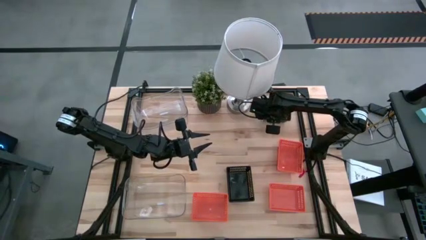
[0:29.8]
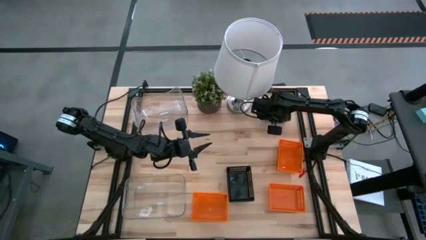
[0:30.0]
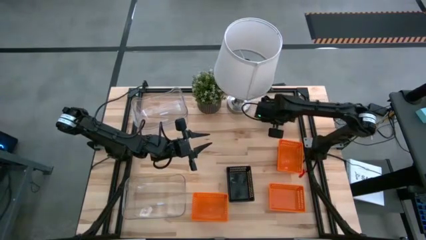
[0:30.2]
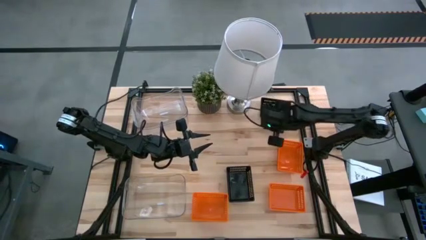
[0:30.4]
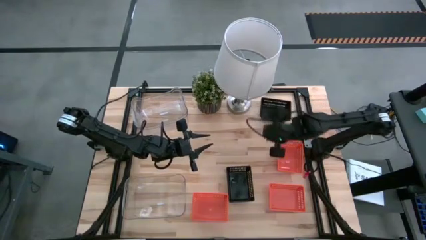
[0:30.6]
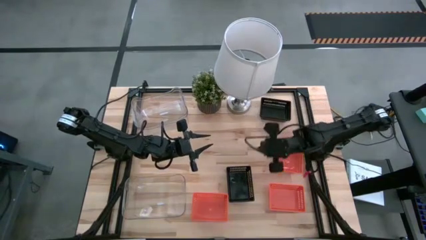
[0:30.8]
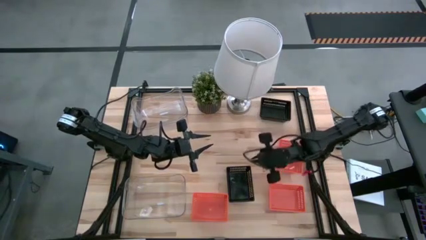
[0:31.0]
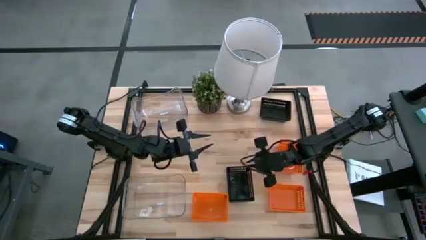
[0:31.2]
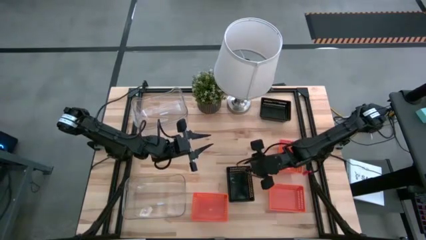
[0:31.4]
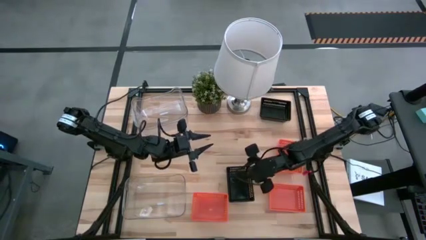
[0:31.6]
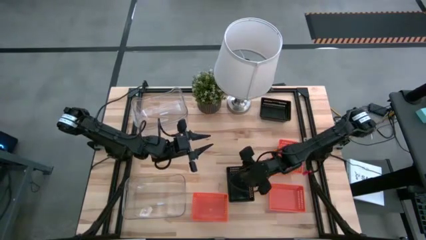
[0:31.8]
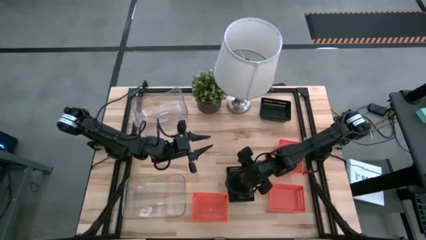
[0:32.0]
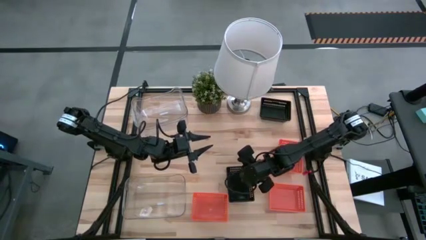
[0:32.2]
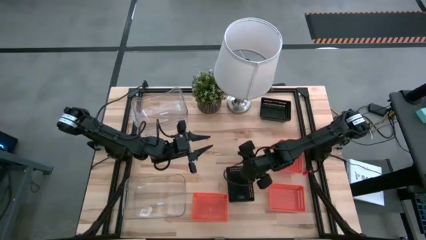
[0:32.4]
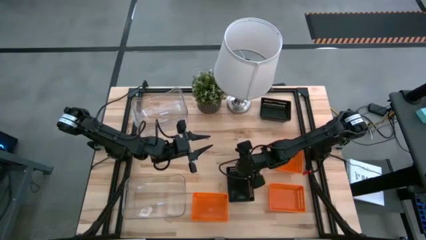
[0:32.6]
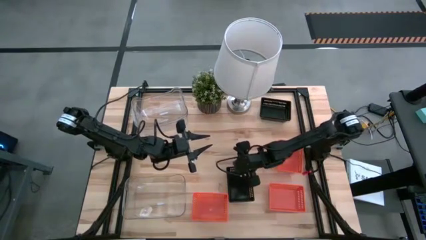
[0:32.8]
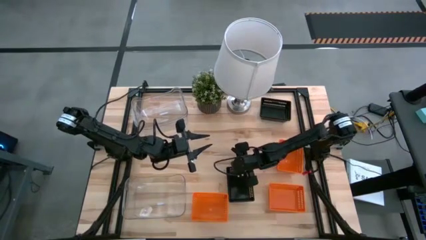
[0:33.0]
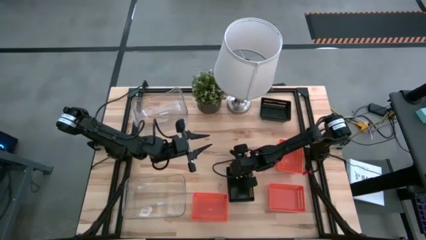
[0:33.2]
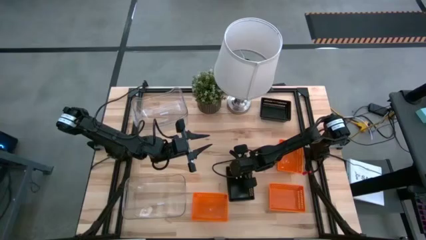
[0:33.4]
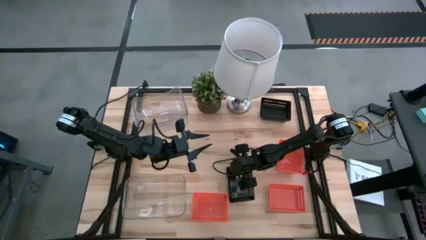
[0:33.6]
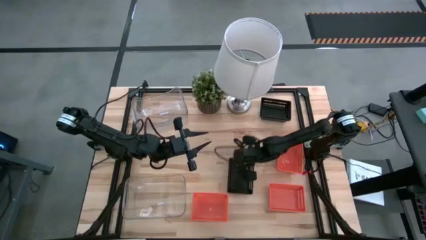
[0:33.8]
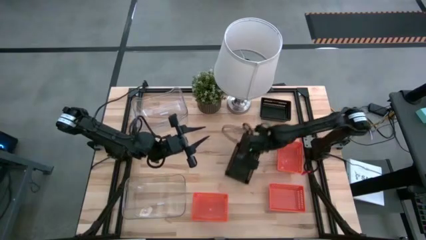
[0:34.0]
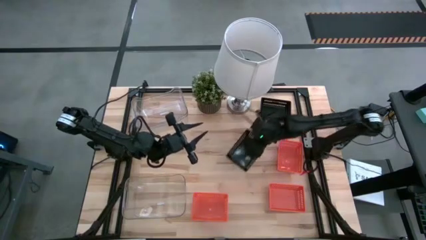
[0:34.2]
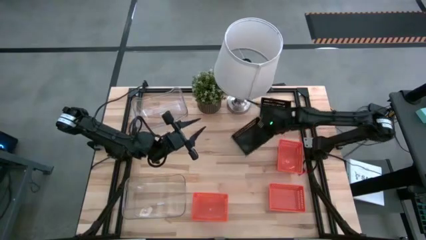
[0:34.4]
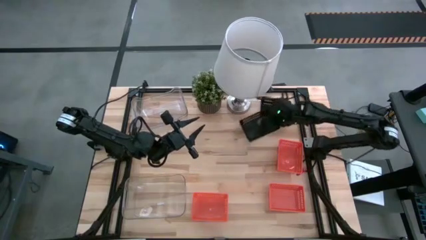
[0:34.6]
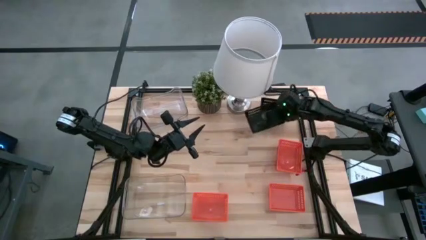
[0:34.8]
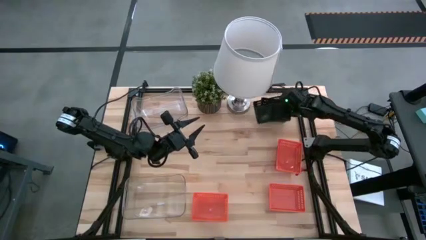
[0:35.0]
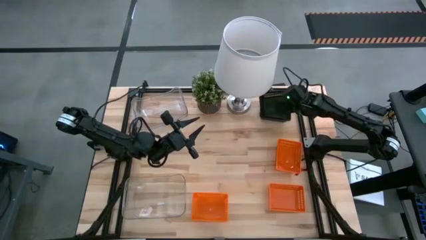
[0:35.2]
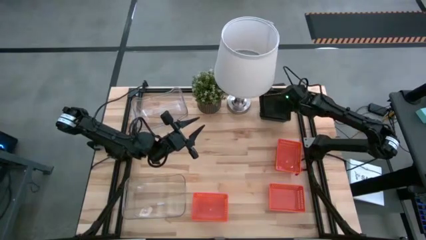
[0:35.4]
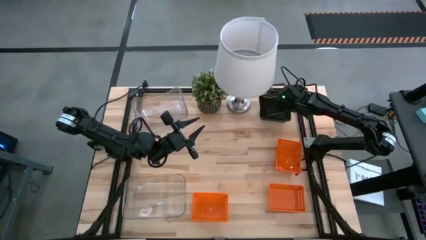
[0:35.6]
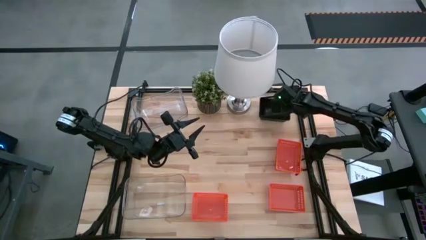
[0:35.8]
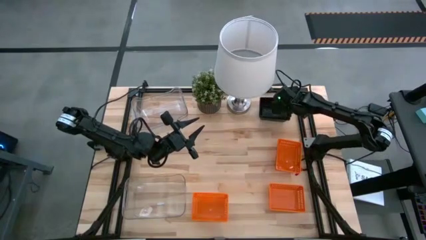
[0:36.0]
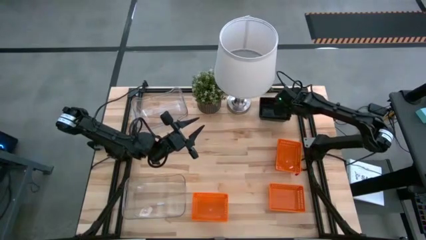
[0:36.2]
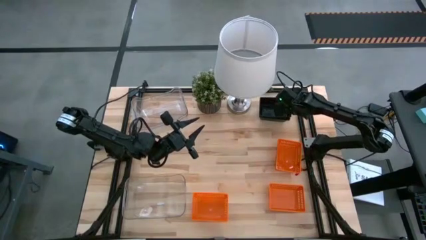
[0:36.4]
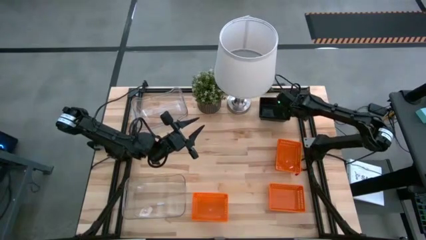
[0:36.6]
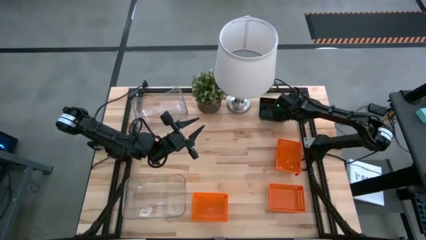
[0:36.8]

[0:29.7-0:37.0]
Stack the black bin on top of the stacked black bins

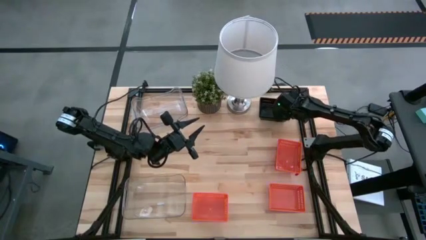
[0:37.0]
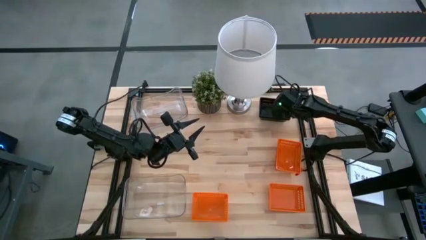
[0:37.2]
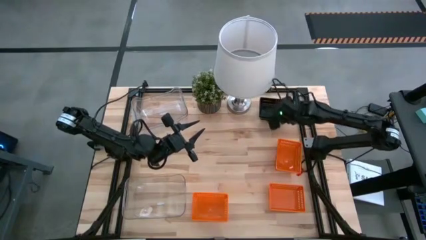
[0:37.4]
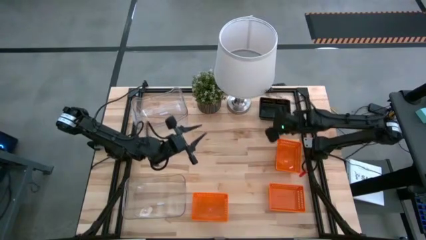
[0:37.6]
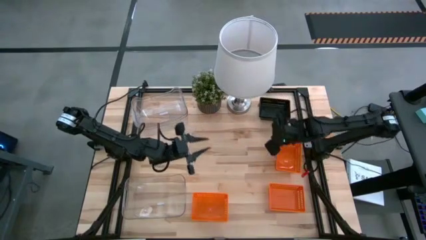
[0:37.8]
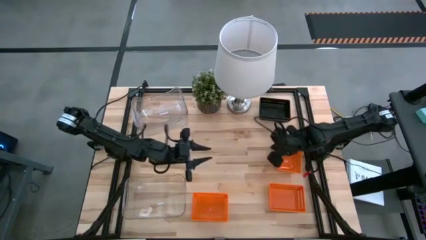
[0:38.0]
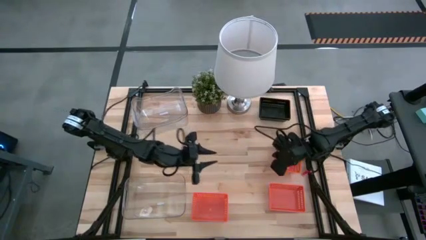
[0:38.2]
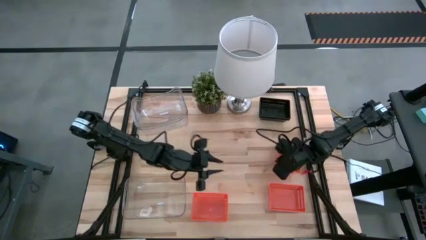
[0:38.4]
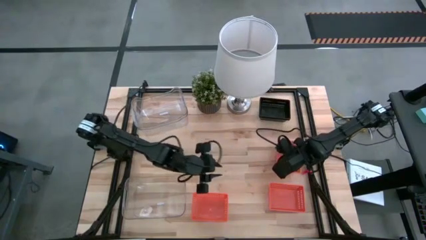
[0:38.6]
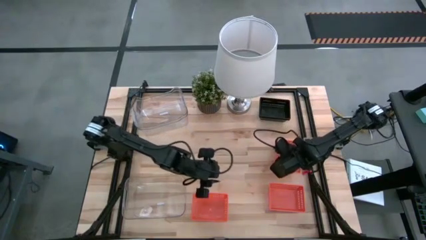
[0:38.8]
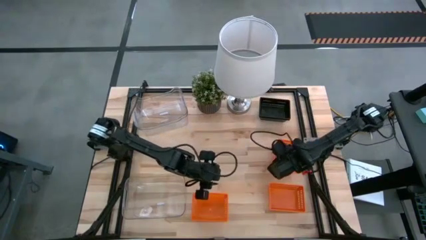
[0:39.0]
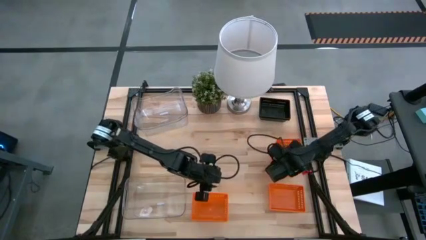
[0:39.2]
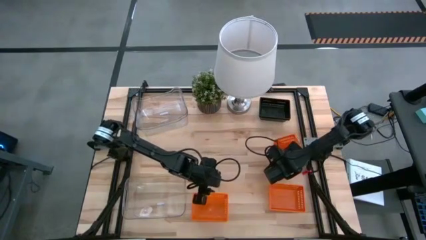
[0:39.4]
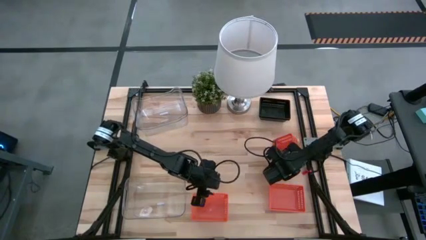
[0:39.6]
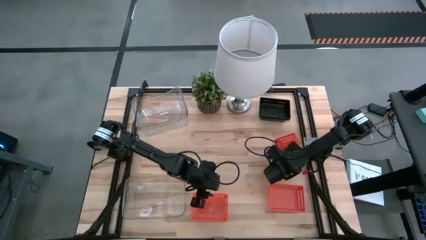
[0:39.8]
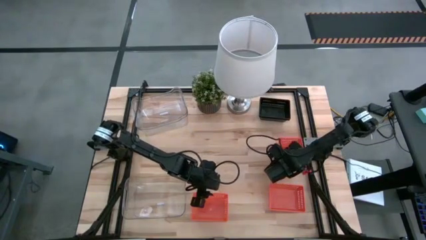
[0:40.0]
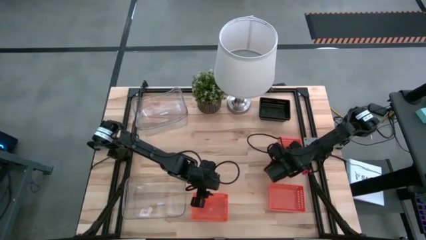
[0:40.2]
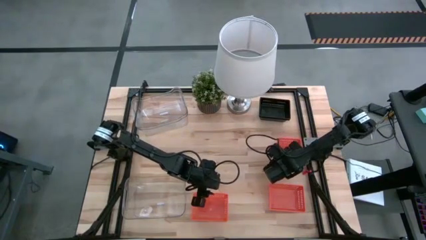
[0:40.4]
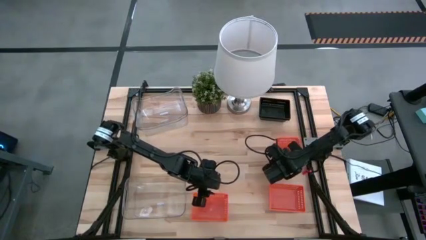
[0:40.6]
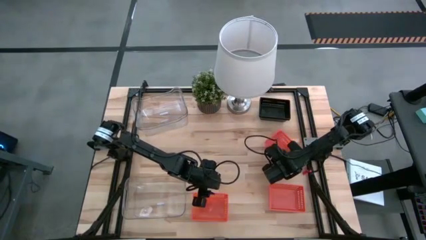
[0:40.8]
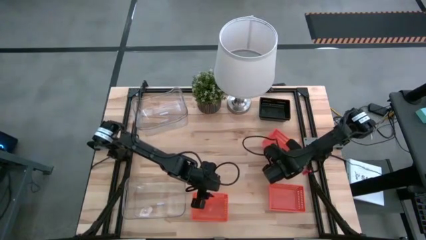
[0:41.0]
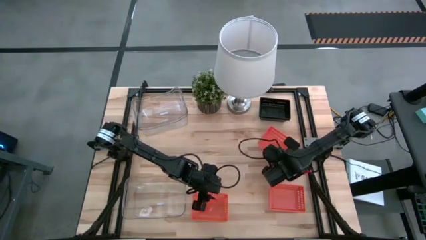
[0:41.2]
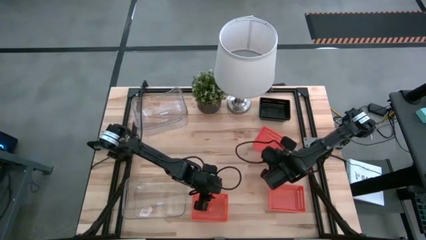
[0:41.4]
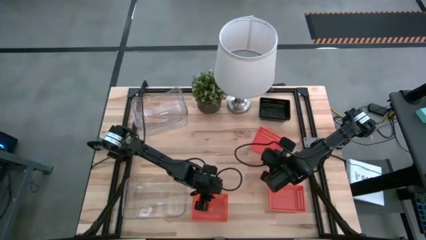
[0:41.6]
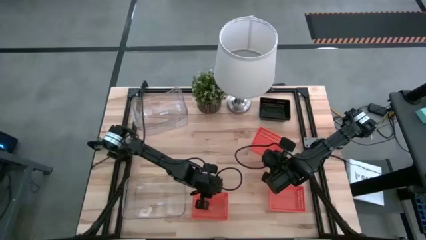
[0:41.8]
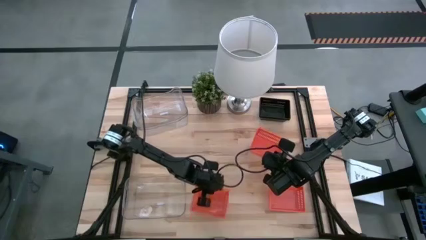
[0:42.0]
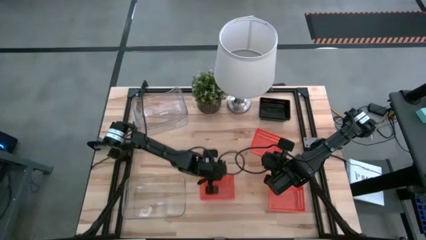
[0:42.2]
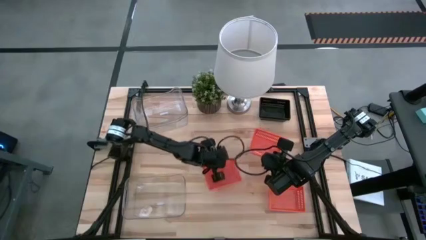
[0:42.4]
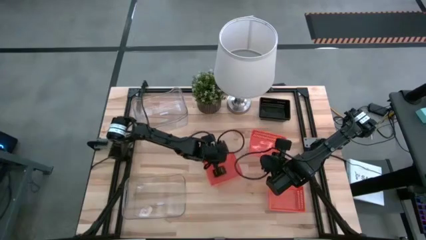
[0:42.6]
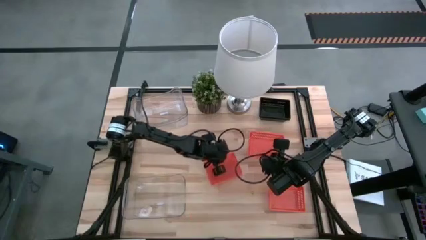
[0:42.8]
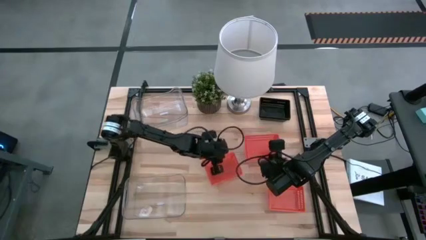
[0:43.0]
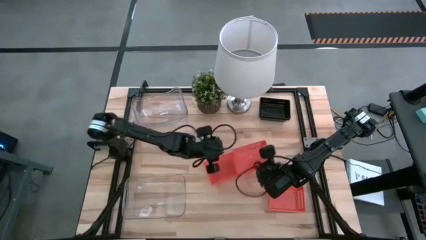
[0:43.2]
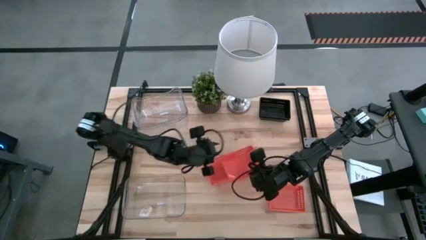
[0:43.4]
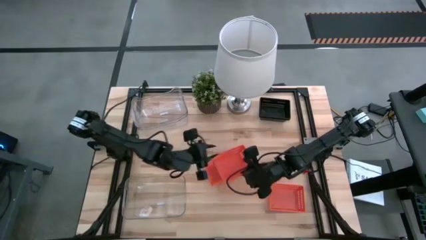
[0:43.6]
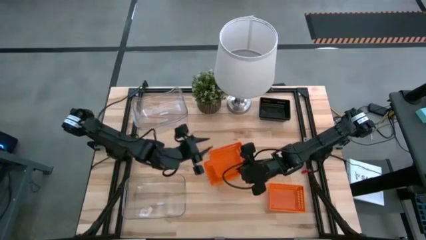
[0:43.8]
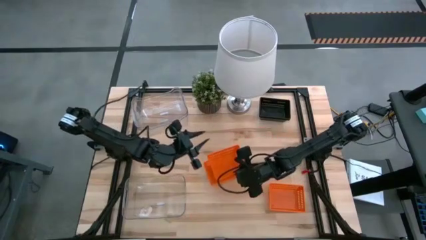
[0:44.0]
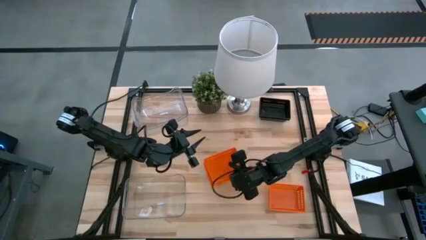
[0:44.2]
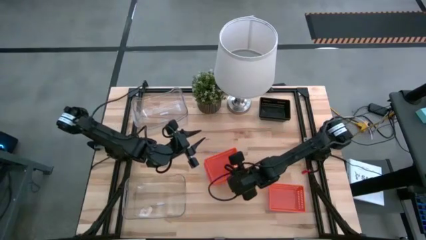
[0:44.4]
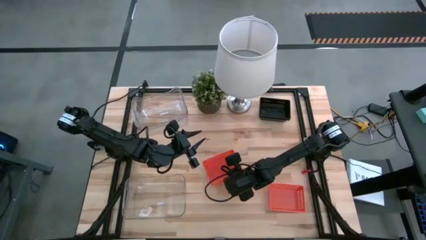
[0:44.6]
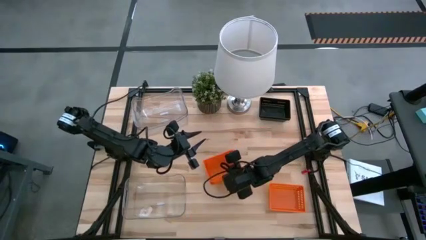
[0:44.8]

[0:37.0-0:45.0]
Stack the top orange bin into the middle orange bin
